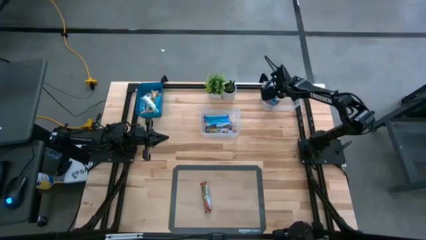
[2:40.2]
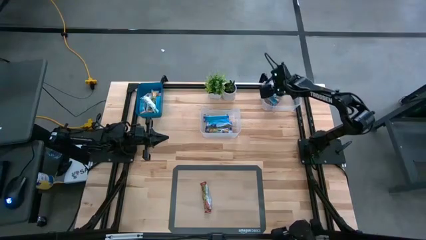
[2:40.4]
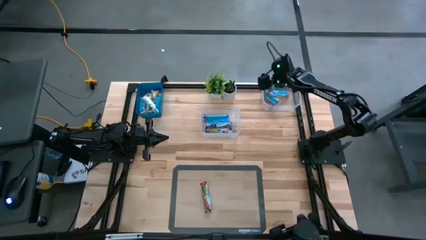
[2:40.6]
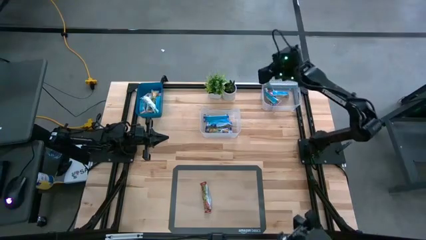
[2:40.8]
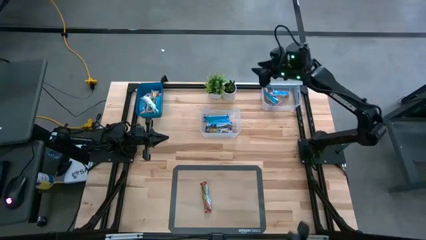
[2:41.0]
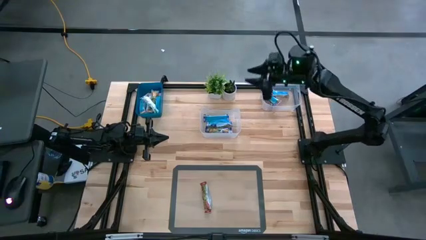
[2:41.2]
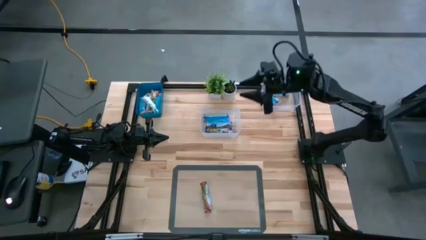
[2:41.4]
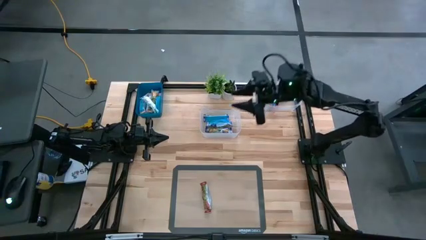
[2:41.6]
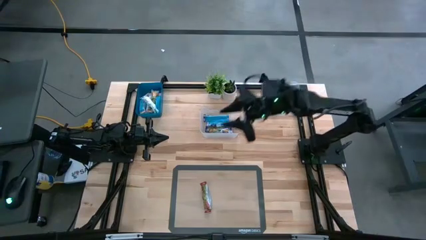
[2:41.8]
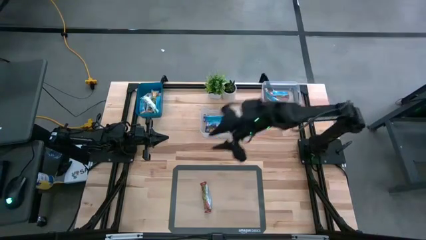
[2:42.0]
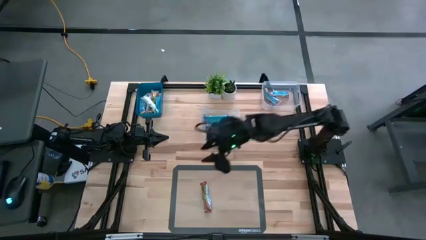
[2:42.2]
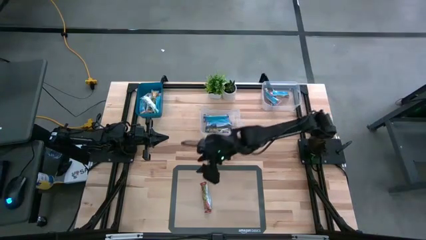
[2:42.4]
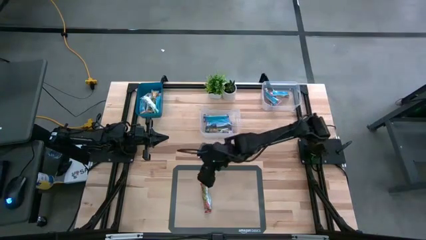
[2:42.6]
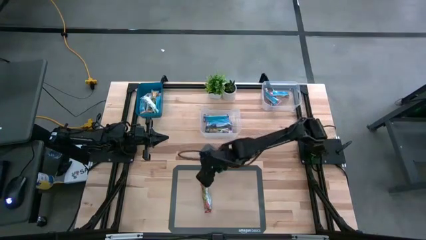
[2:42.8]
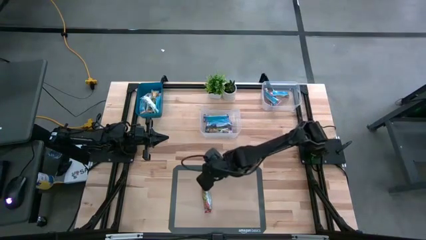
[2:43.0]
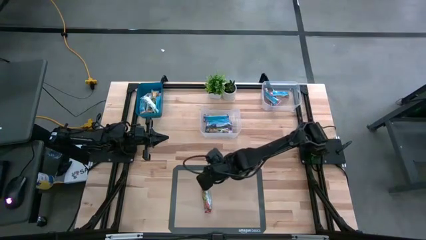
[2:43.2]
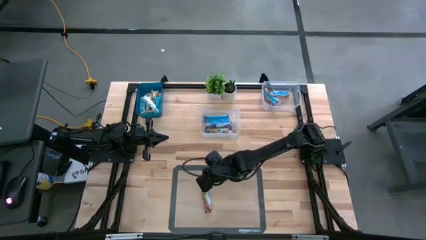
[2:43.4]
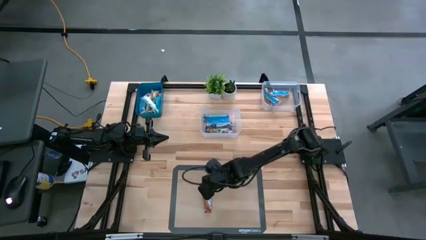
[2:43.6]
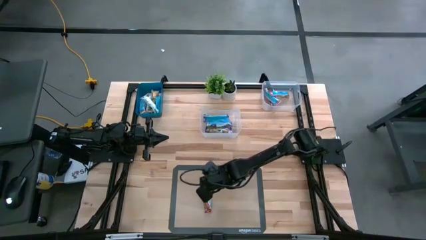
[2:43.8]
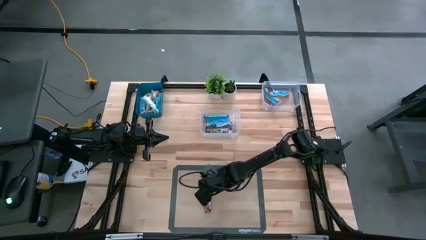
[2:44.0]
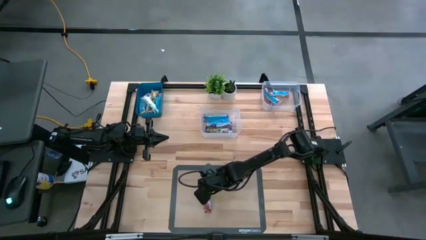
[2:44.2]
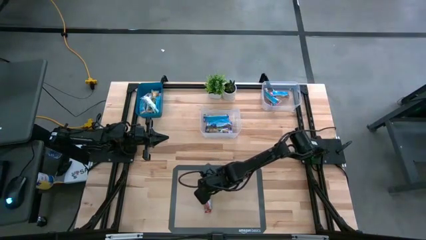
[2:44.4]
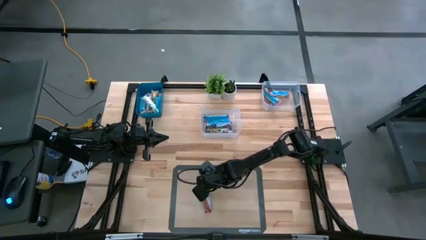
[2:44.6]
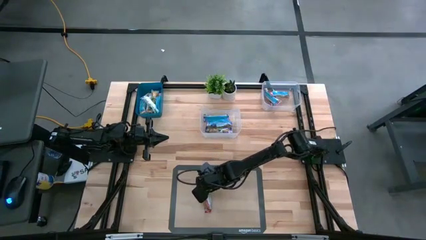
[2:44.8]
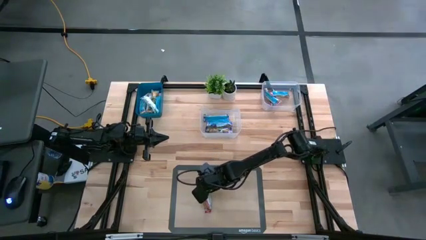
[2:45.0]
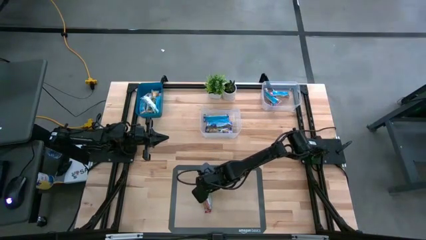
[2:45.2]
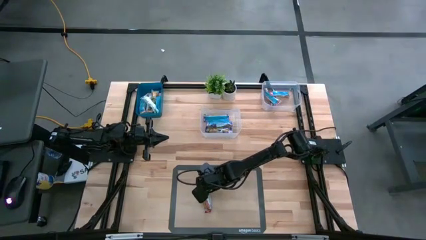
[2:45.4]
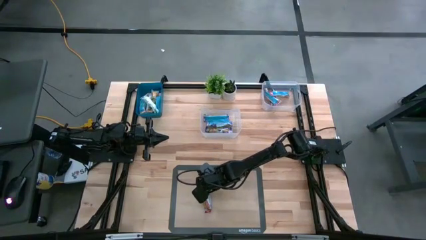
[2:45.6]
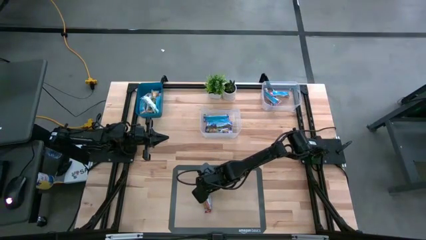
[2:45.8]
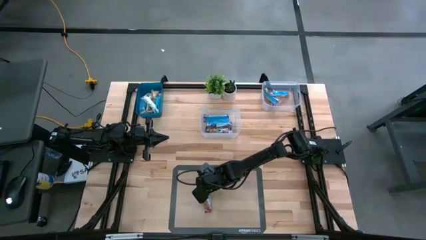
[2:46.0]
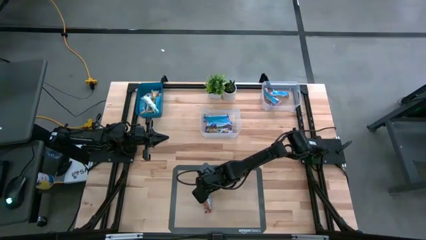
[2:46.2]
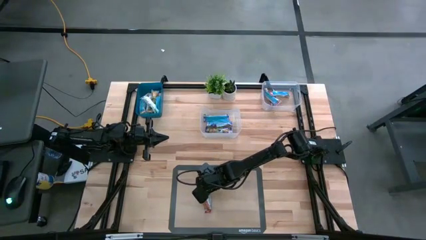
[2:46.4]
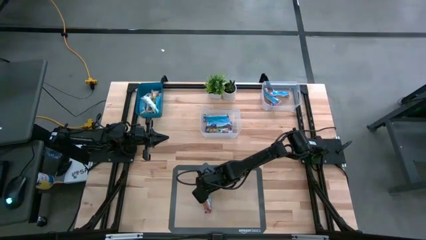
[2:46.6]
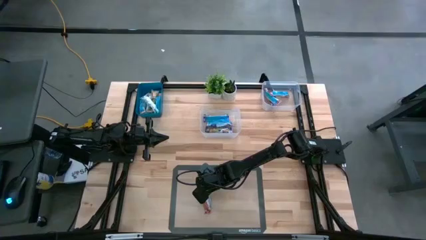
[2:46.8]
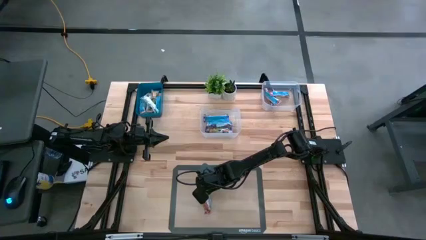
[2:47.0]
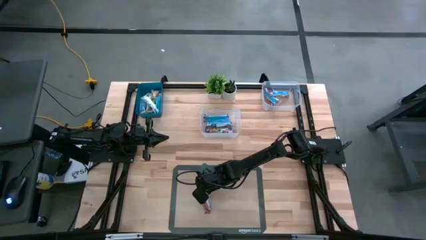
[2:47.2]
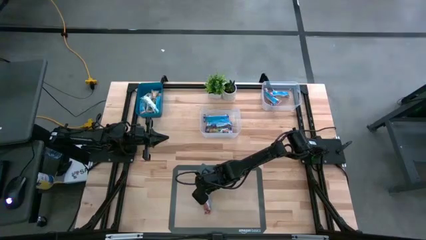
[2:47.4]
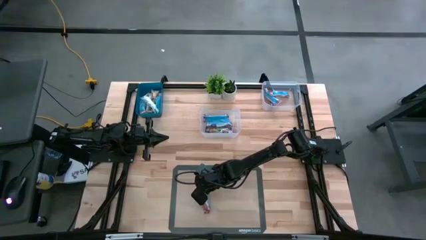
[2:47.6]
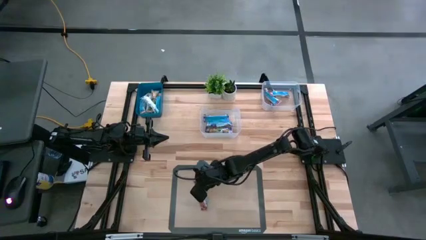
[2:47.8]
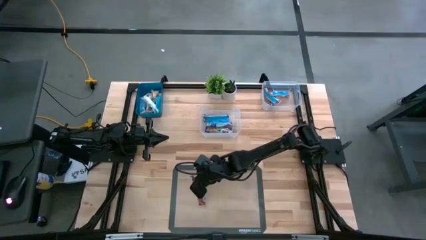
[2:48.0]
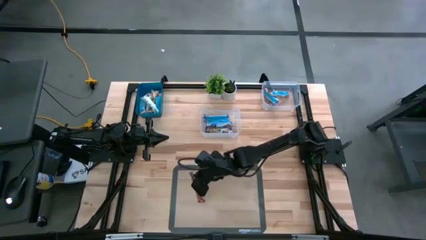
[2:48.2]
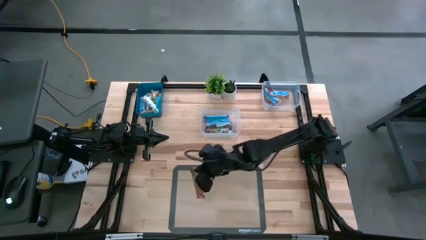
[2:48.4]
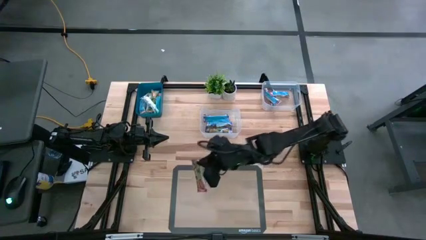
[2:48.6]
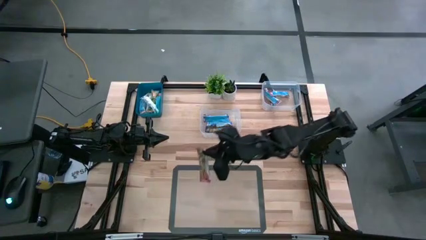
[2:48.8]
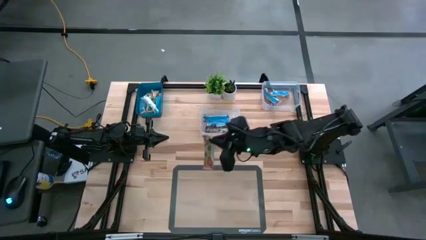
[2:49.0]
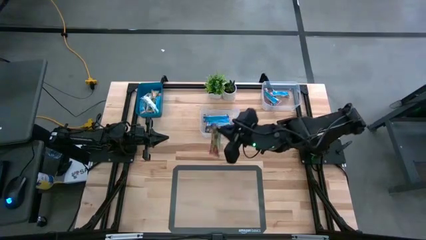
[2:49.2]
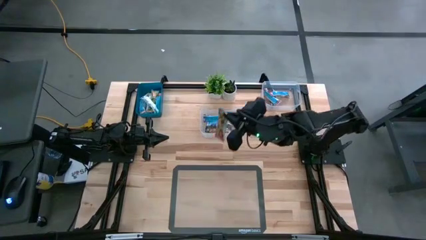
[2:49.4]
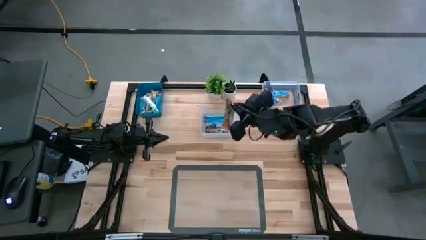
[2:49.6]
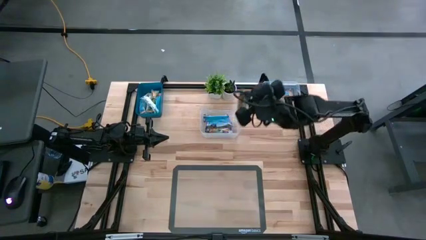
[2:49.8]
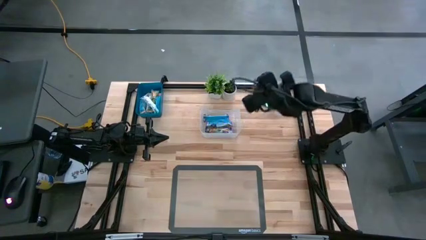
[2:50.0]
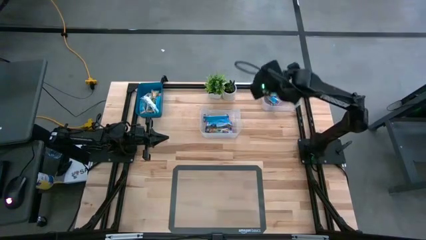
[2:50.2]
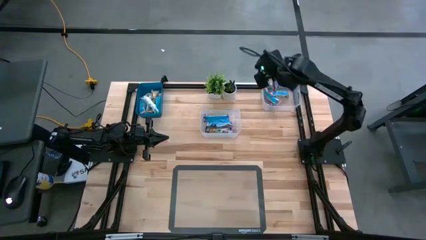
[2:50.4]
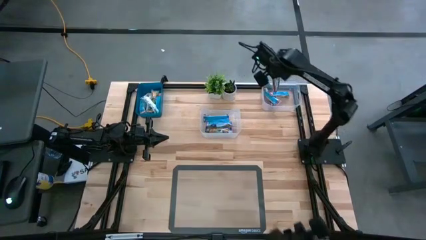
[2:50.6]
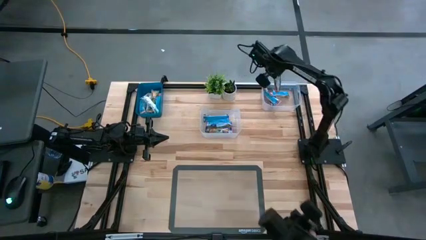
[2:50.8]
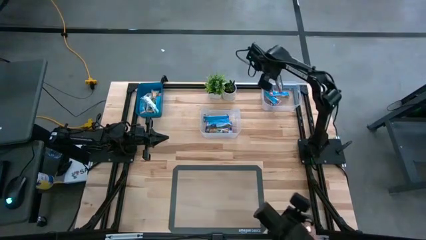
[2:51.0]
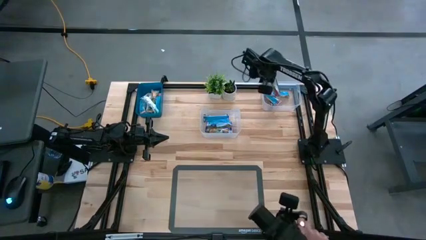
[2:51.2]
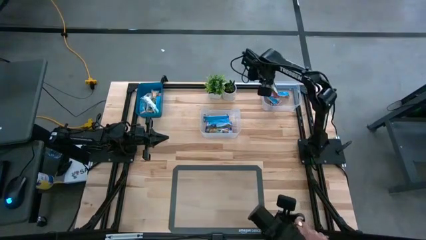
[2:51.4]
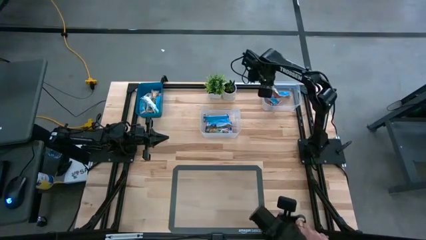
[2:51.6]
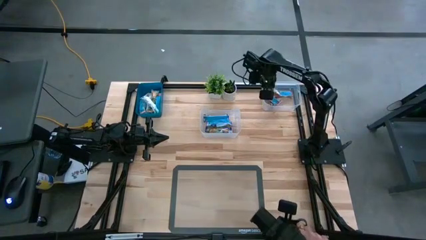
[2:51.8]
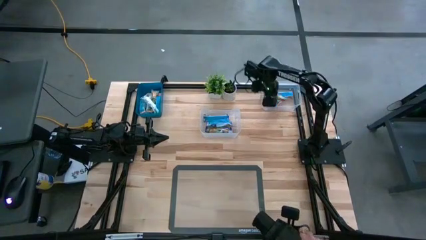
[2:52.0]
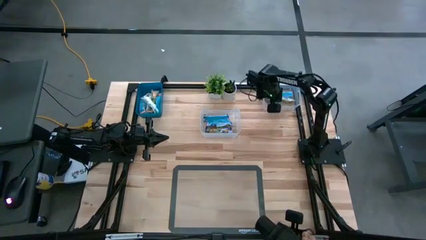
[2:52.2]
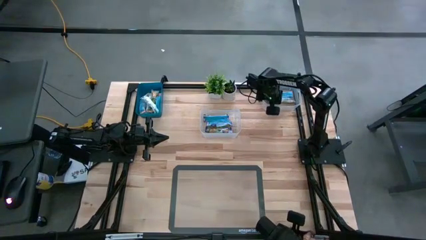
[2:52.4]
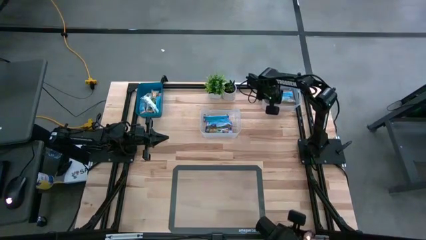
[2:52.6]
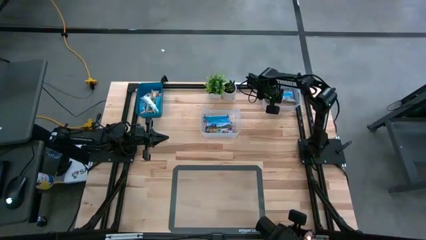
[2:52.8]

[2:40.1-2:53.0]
Task: Pick and place Granola Bars by type
Put the red granola bar in the right transparent bin

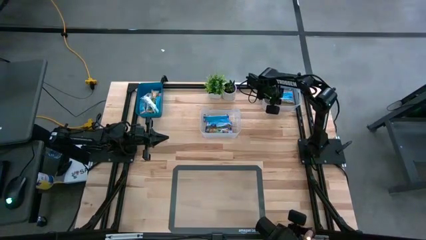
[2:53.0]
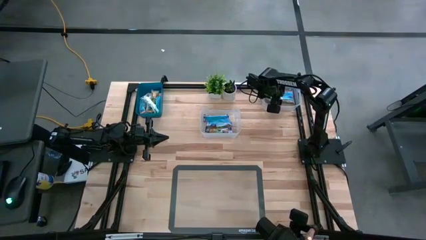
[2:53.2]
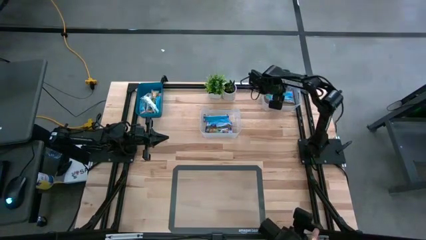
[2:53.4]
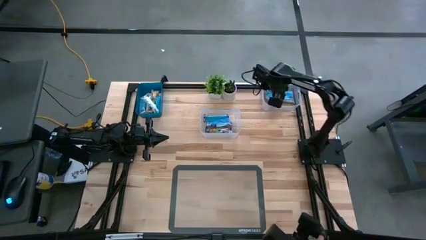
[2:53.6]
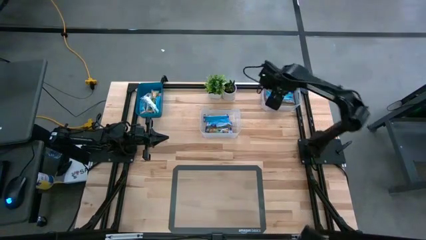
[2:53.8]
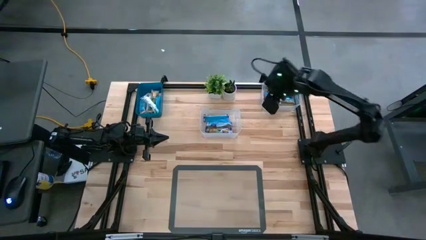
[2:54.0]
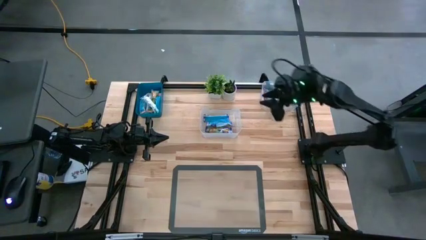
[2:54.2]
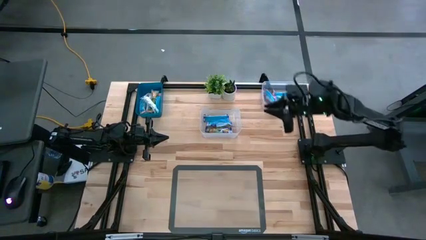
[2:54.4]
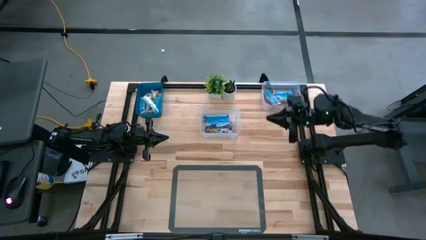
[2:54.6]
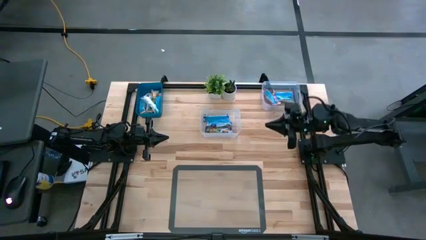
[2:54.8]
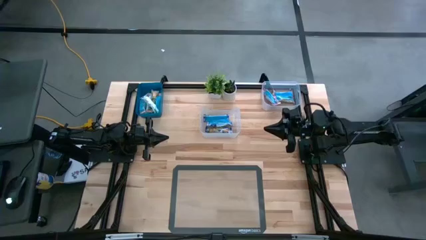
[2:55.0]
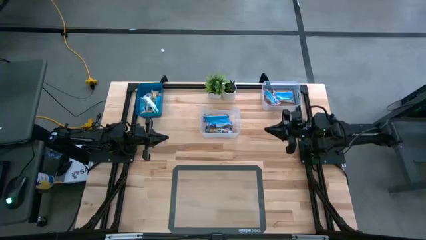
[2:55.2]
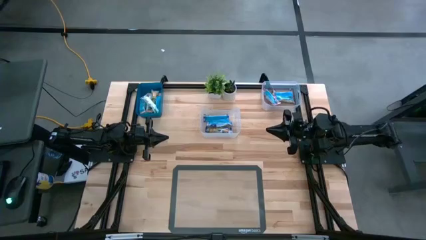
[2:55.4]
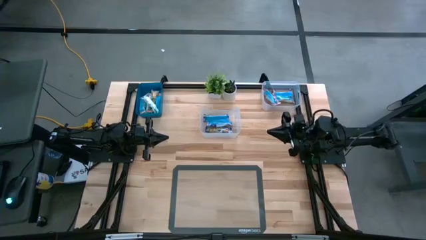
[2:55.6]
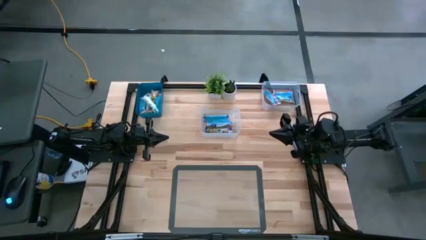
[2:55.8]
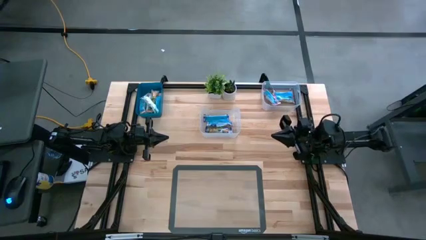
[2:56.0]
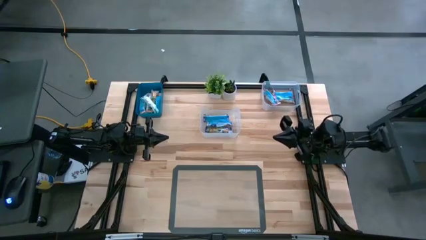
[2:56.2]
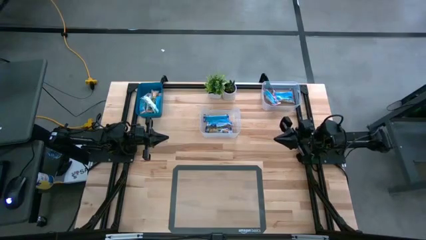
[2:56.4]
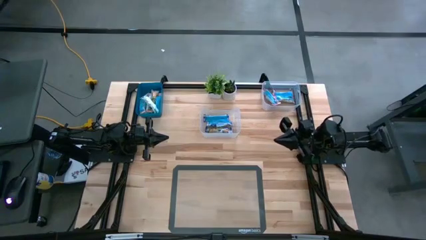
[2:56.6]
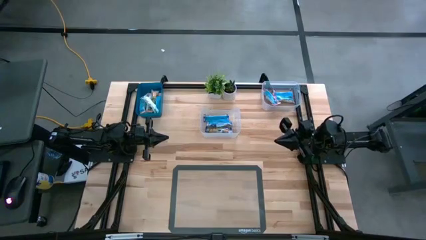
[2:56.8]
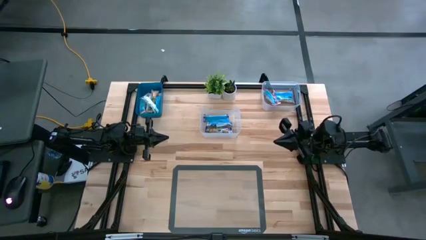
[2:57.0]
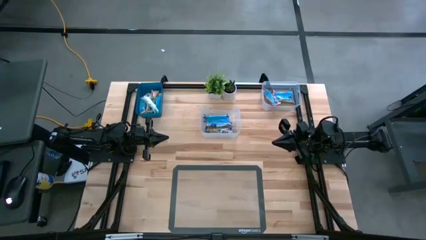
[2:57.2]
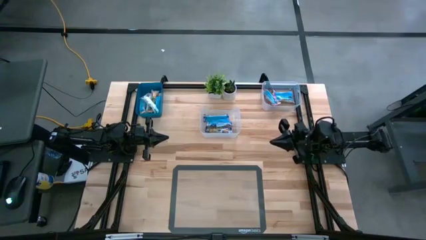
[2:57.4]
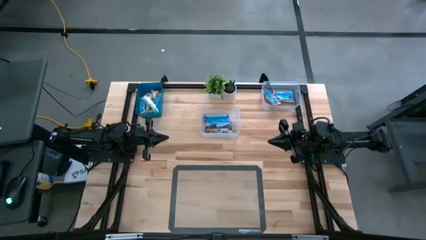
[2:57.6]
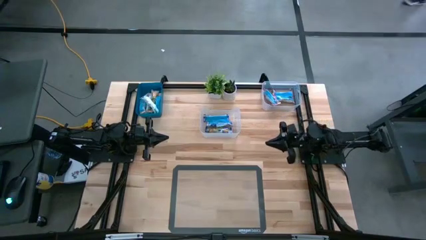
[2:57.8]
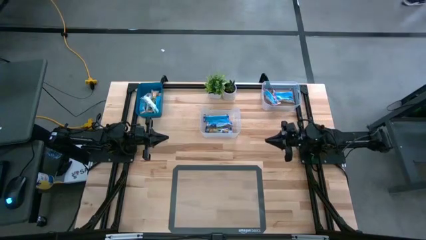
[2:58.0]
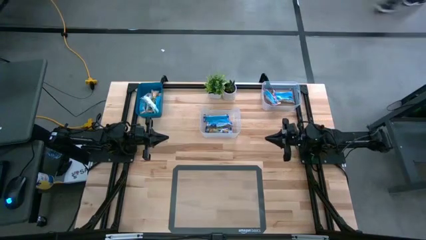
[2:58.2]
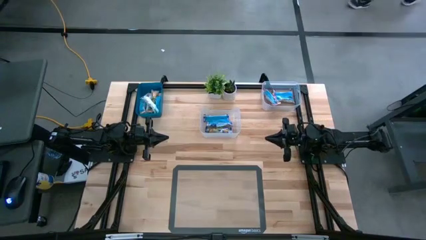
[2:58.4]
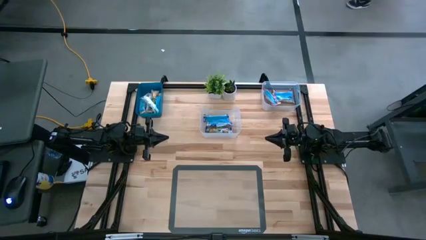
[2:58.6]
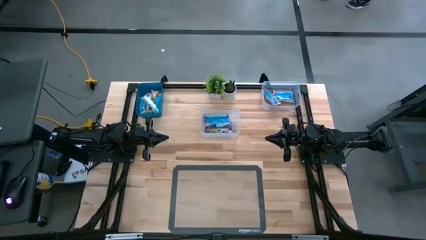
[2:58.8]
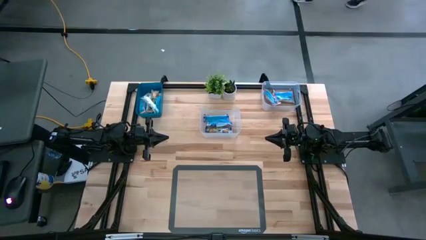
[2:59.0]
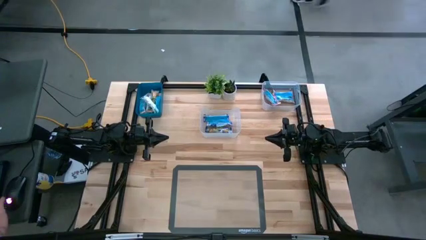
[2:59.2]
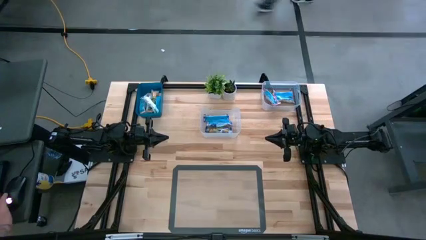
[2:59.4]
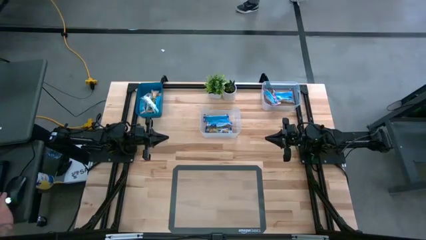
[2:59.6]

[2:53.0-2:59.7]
Return to Home Position
